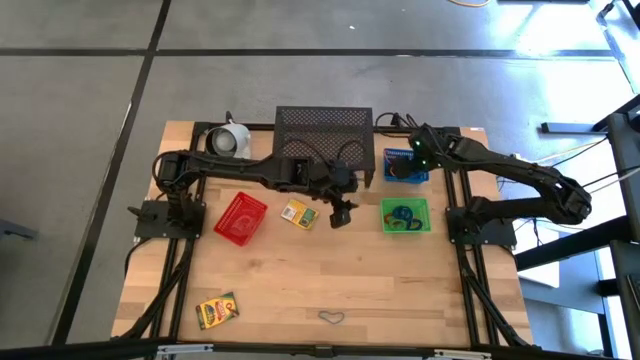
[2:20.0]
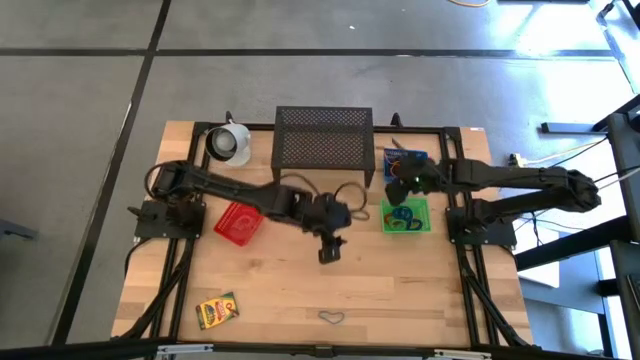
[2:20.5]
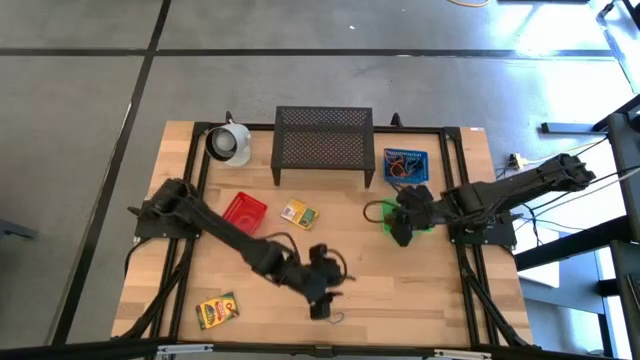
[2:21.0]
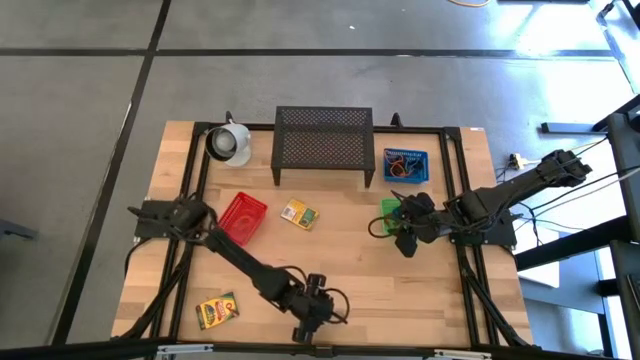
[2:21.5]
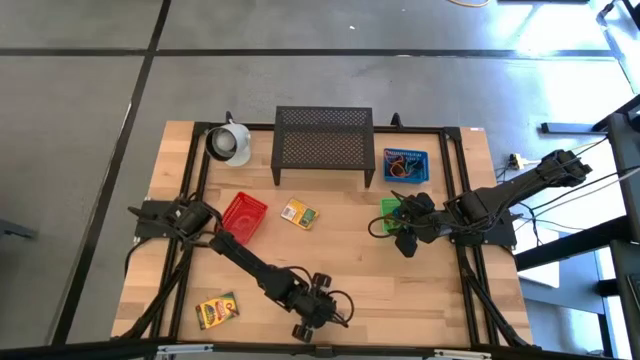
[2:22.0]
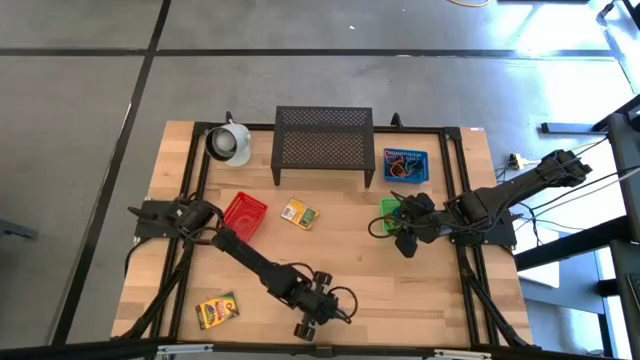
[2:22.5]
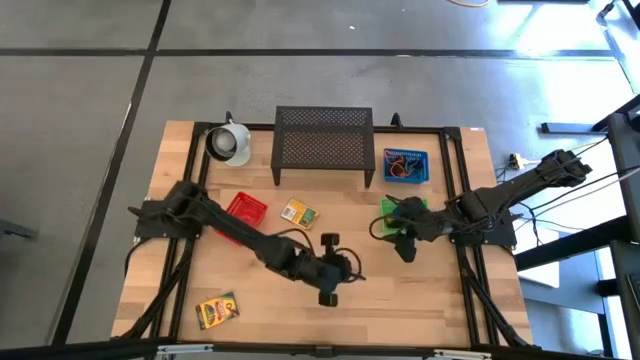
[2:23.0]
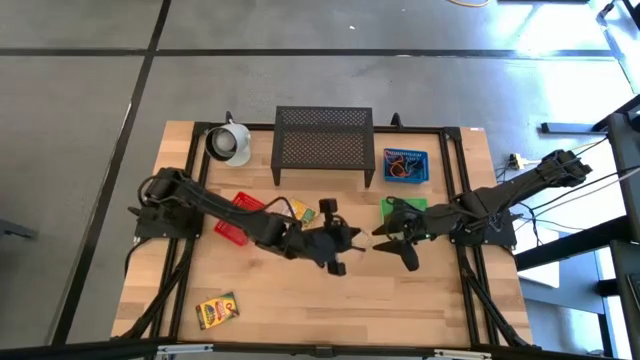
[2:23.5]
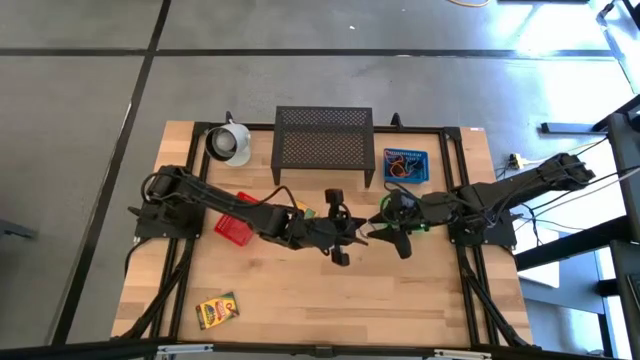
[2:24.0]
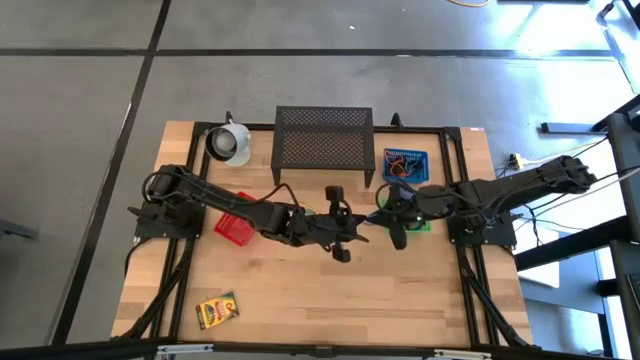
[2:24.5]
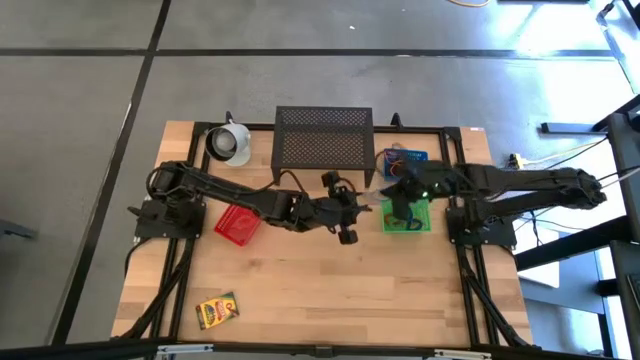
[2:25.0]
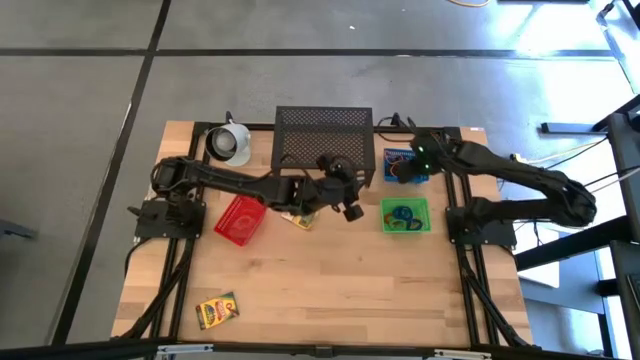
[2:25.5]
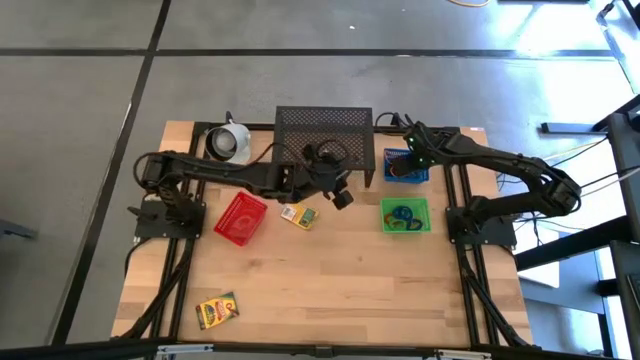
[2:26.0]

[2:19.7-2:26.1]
Task: Pick & Place Office Desk Supplies
Put the blue rubber band into the blue bin

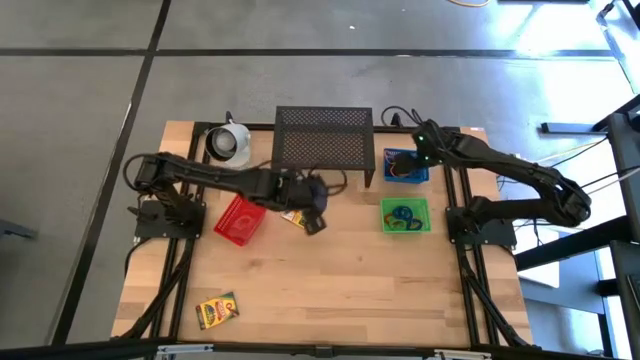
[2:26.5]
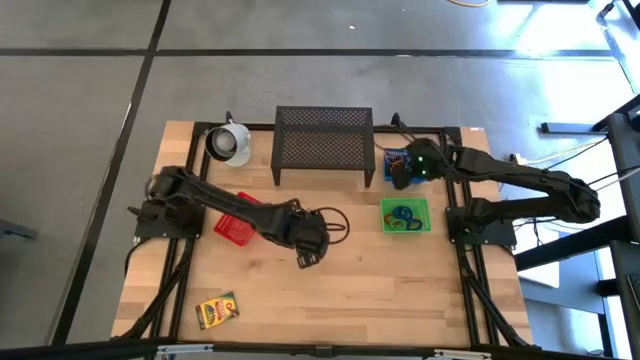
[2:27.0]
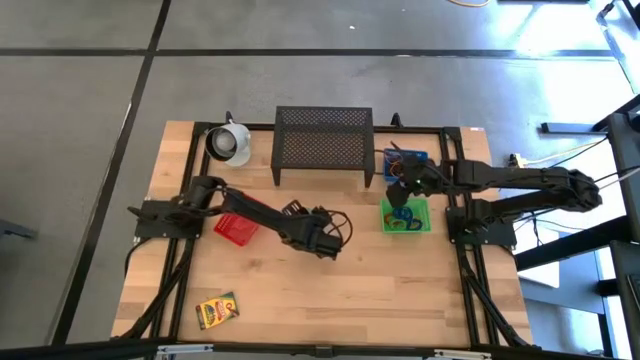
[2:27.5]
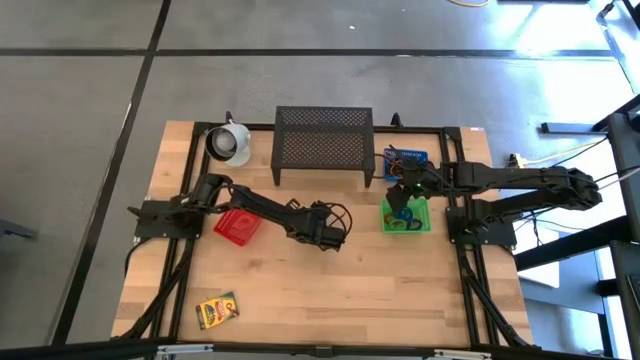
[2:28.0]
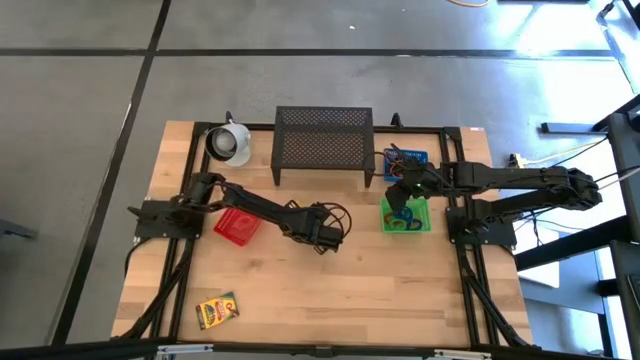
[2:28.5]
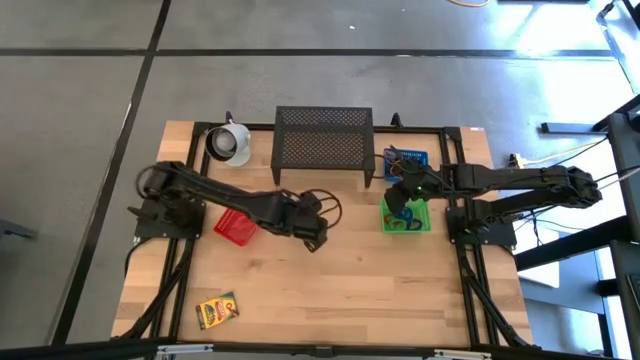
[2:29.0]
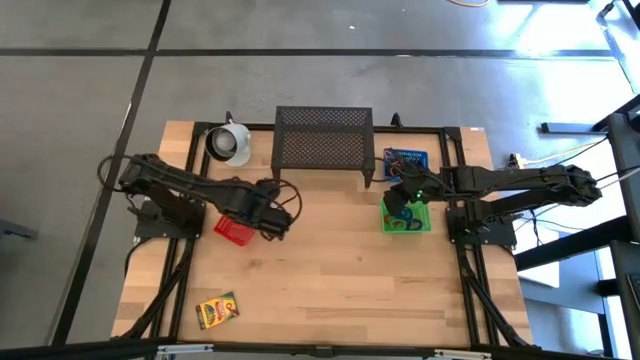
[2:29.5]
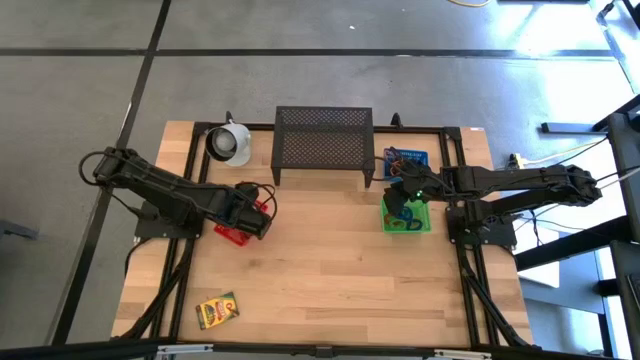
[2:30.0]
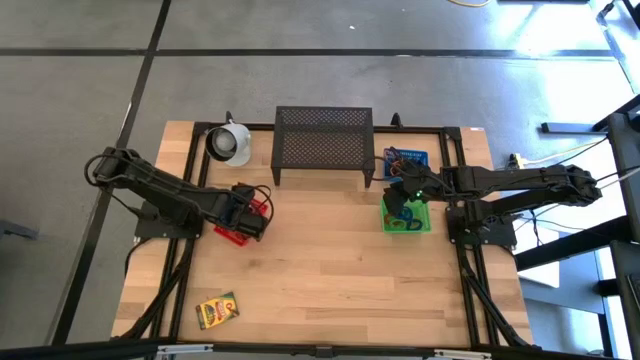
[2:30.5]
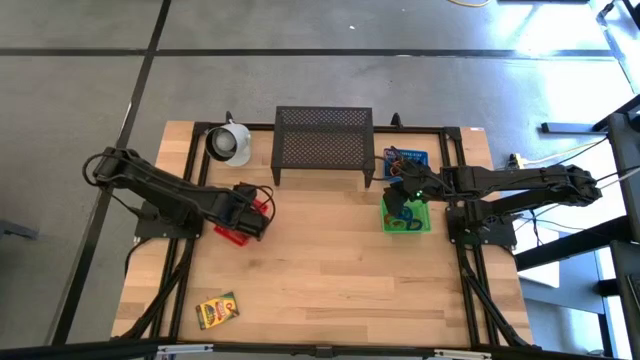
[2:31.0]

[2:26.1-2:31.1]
Put the yellow crayon box into the red bin

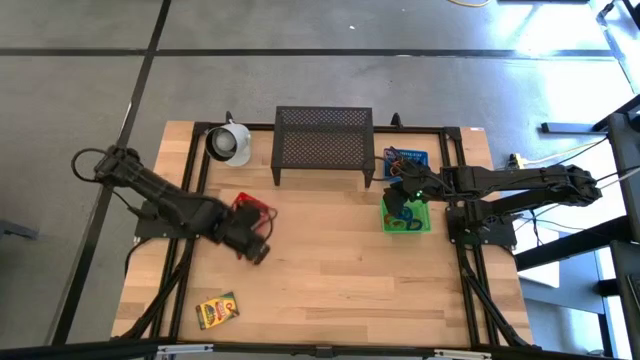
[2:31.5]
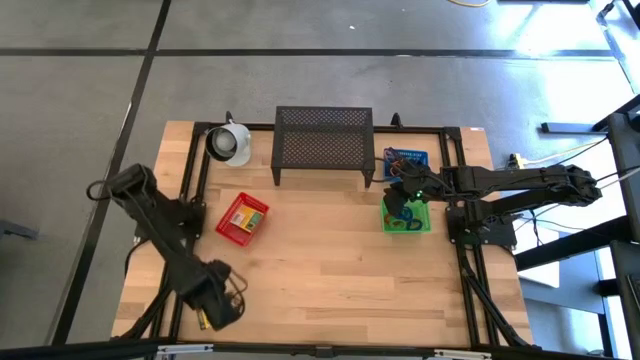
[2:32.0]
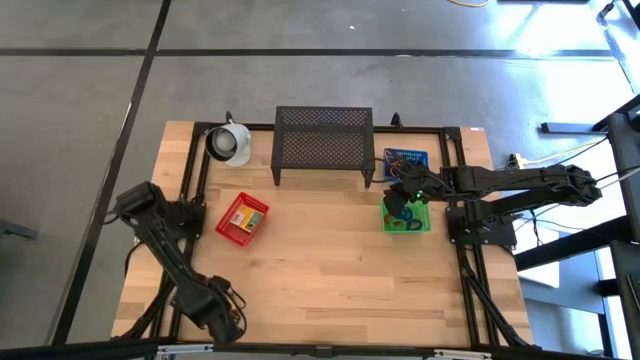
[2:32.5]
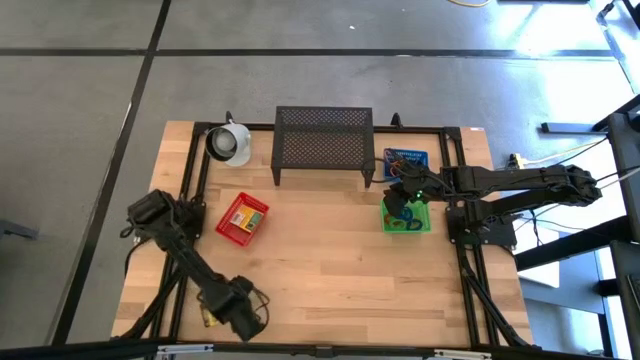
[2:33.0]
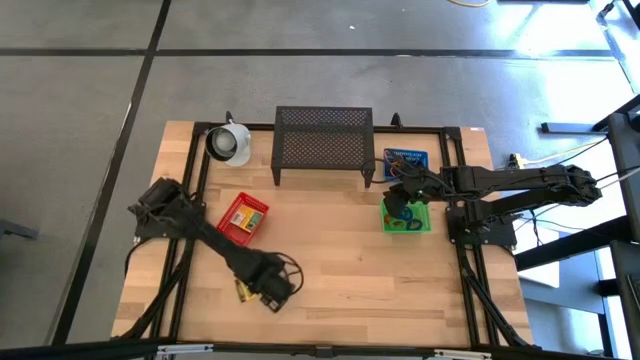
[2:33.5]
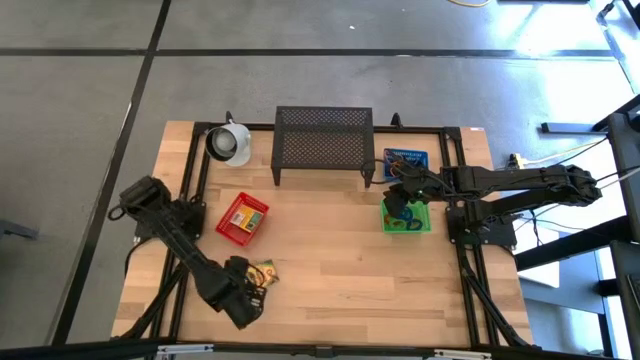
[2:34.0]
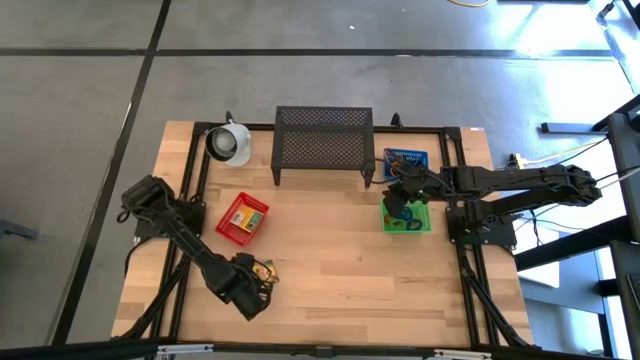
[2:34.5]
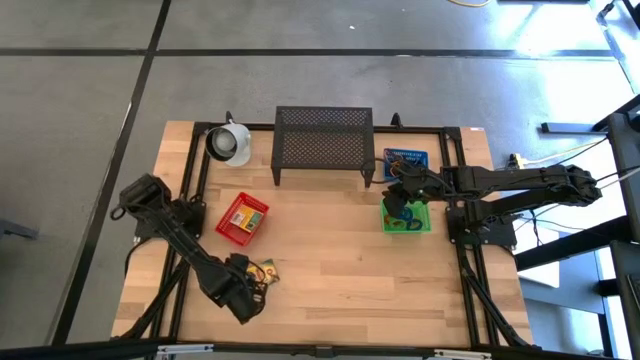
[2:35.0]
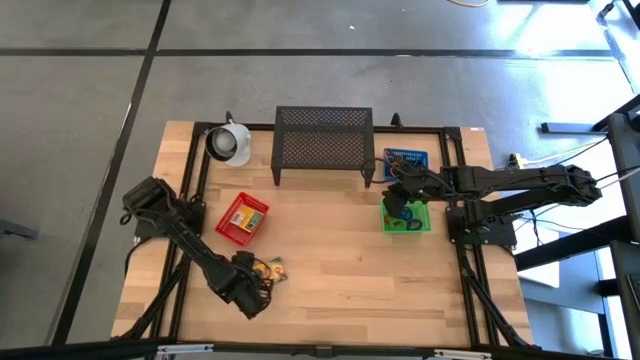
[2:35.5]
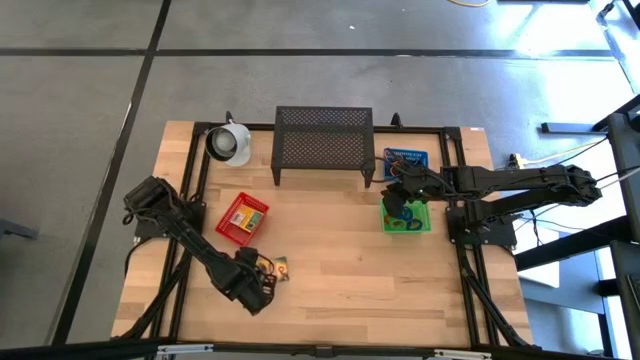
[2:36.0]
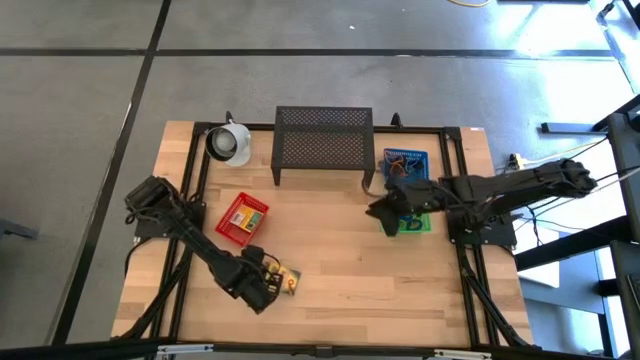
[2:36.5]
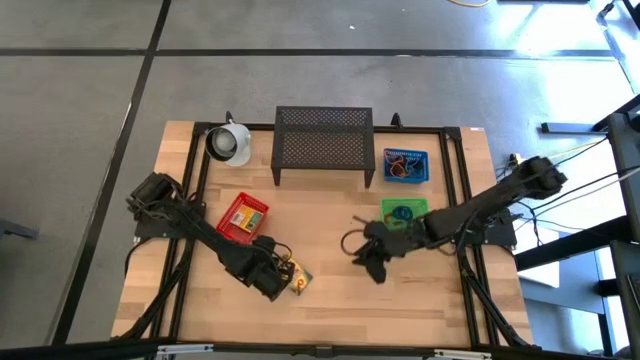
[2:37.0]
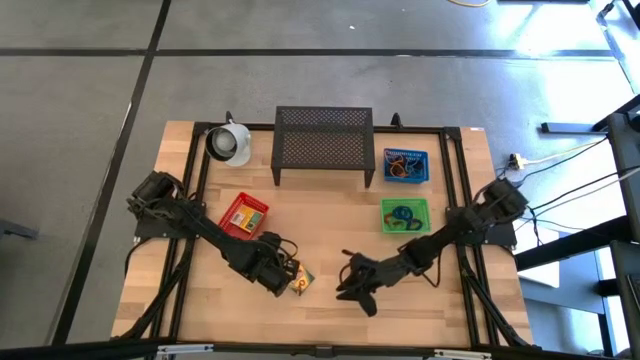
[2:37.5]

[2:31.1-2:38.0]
Put the yellow crayon box into the red bin

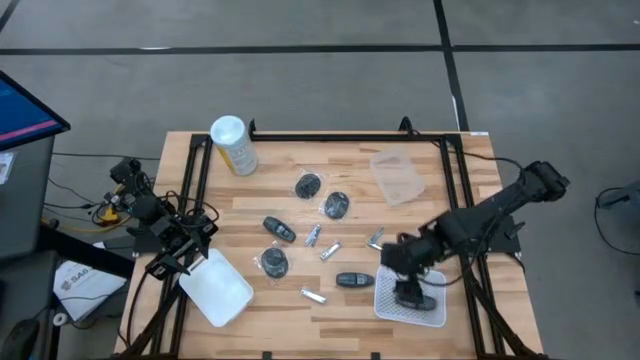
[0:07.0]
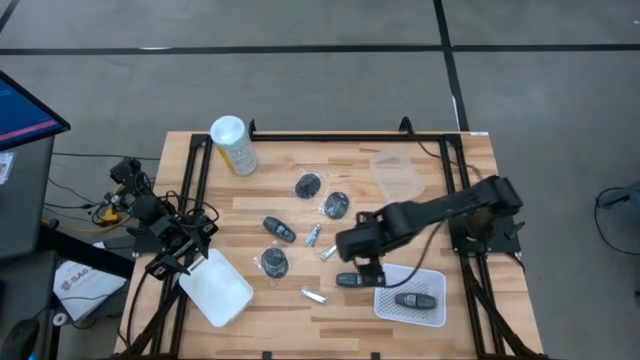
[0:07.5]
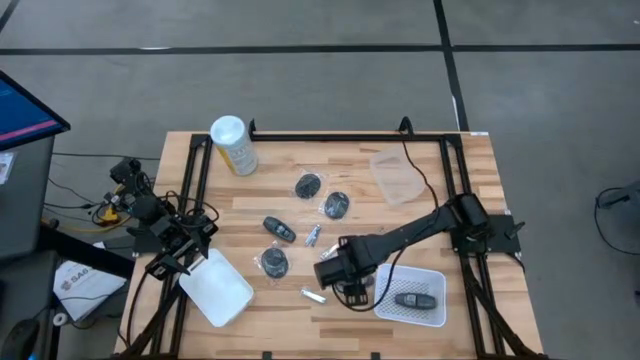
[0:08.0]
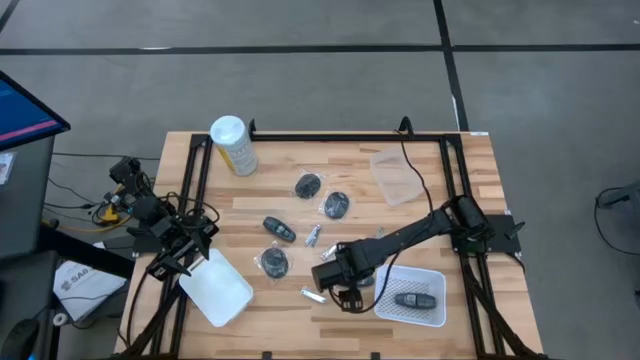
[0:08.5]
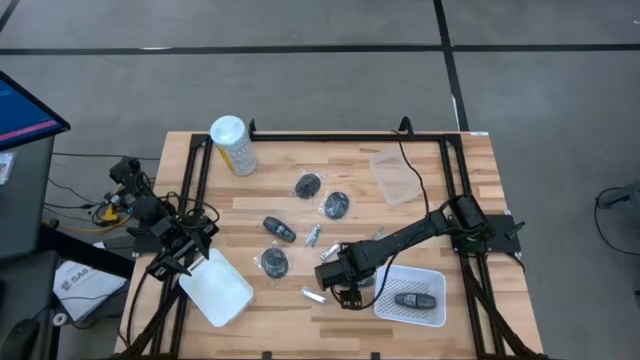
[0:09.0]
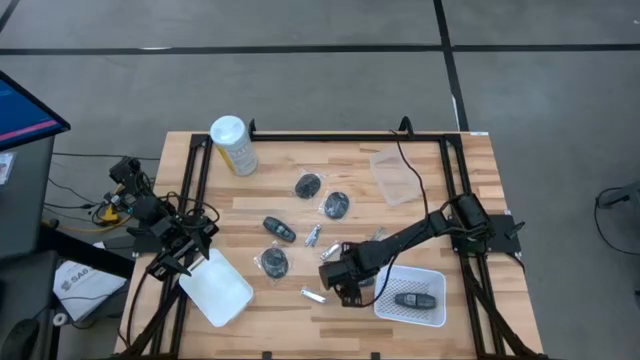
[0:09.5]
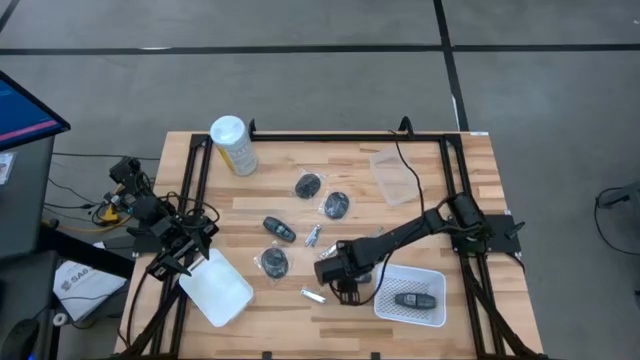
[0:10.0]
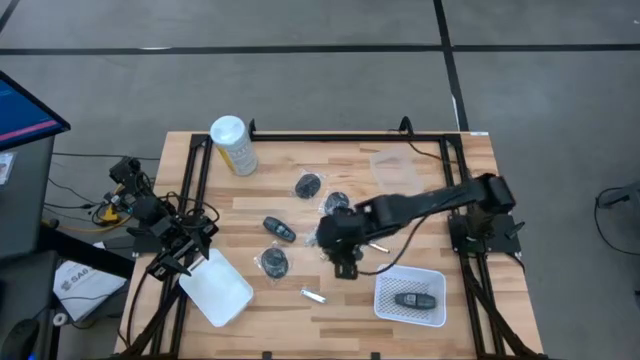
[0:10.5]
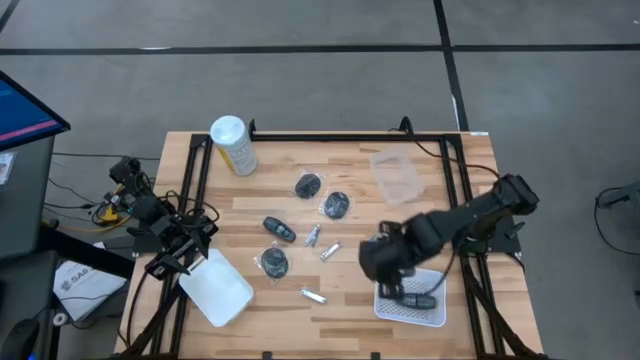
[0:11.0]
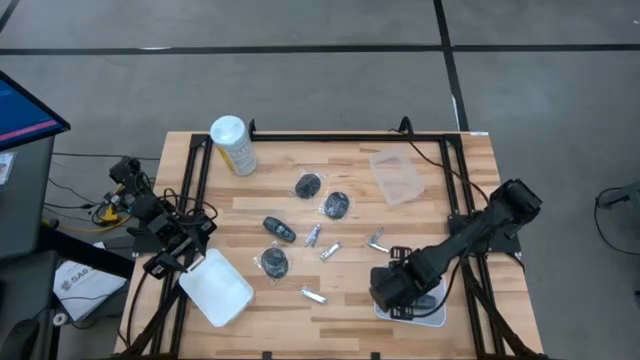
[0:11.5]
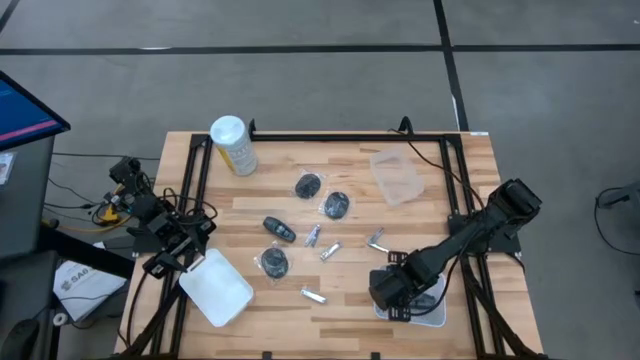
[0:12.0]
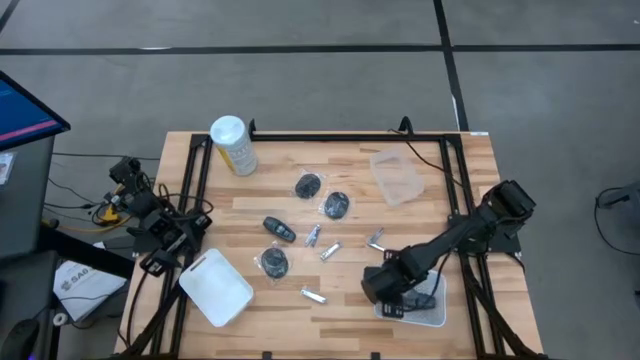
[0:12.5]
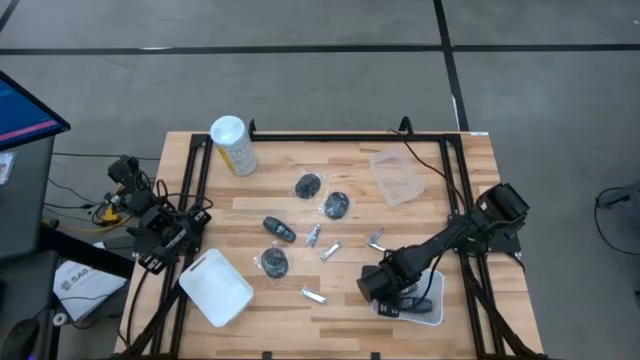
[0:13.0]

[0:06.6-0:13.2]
Task: Pick & Place Travel size toiletries
Put the black deodorant into the right white bin
